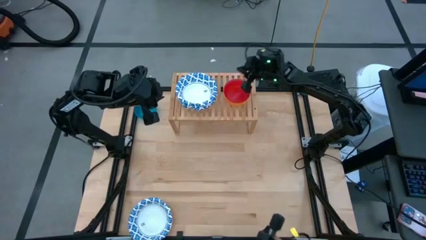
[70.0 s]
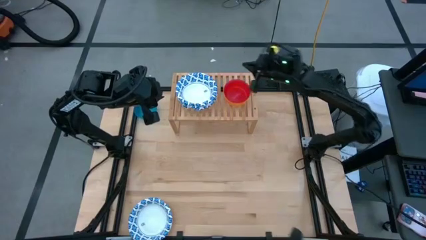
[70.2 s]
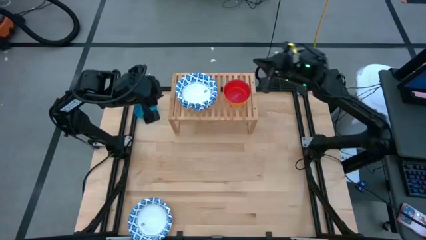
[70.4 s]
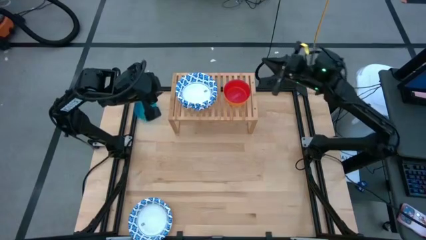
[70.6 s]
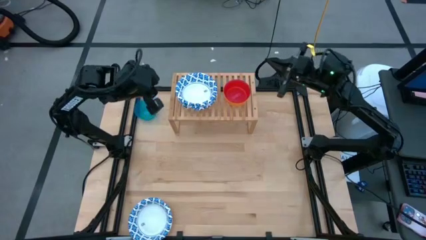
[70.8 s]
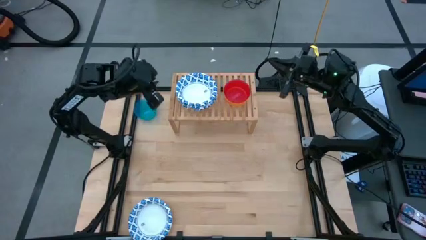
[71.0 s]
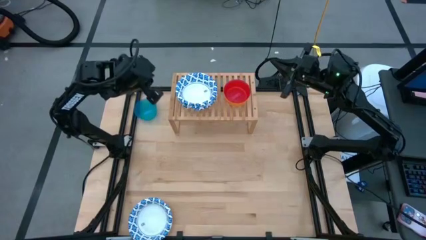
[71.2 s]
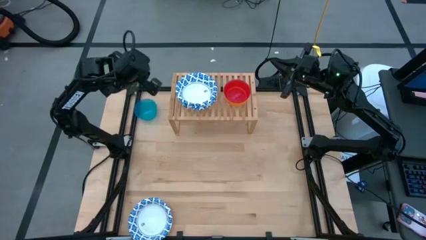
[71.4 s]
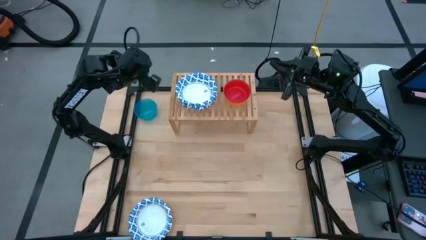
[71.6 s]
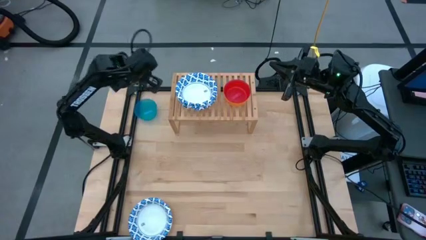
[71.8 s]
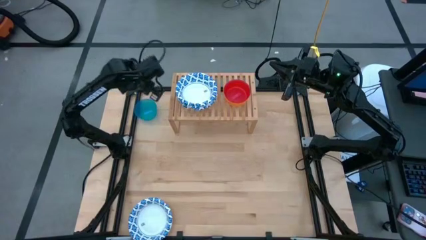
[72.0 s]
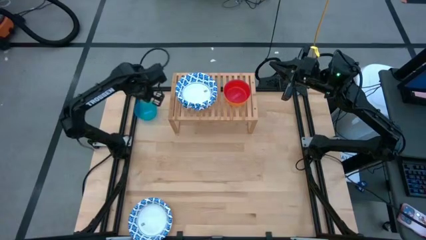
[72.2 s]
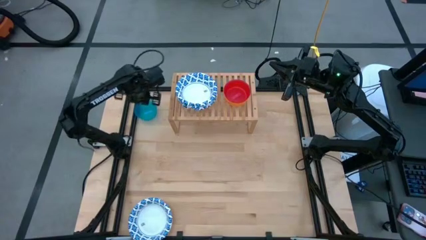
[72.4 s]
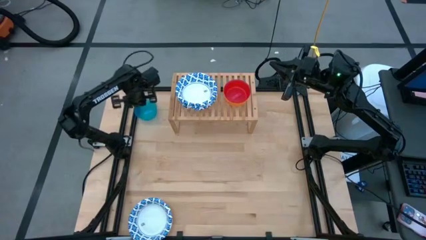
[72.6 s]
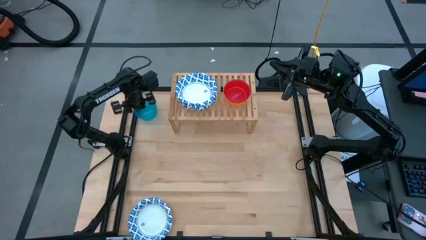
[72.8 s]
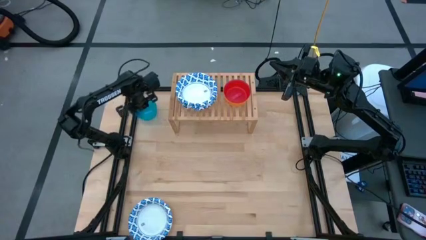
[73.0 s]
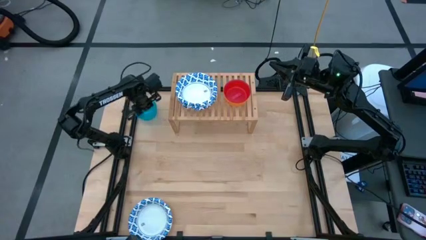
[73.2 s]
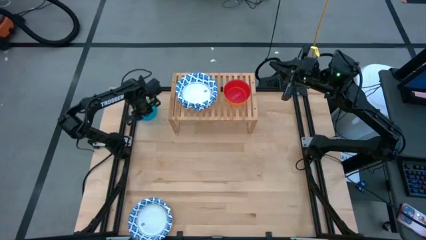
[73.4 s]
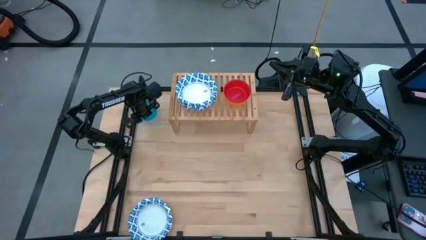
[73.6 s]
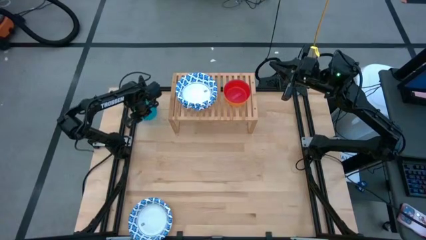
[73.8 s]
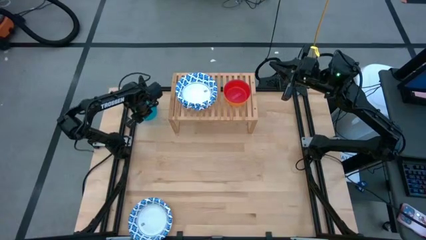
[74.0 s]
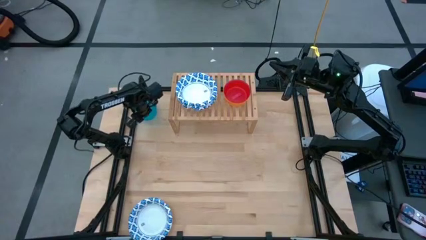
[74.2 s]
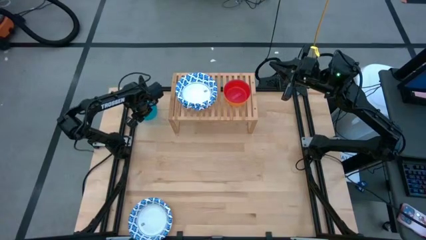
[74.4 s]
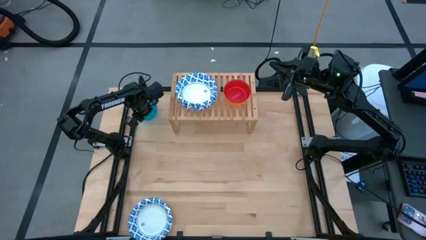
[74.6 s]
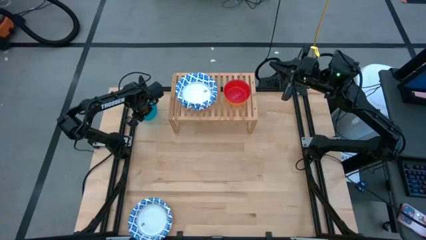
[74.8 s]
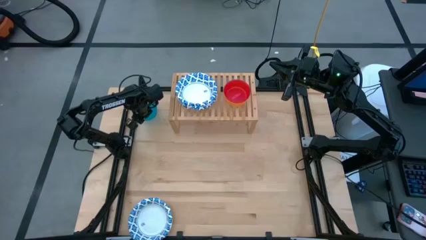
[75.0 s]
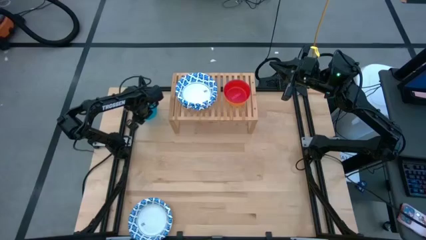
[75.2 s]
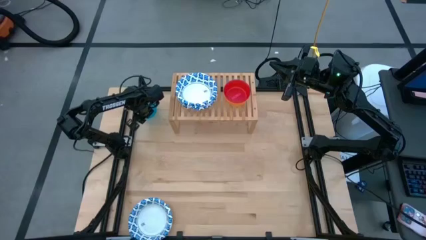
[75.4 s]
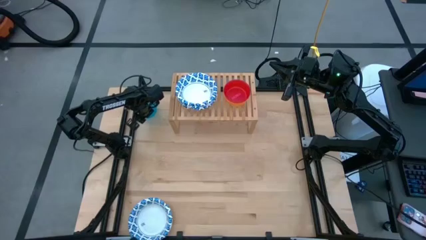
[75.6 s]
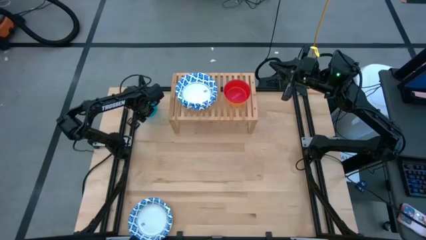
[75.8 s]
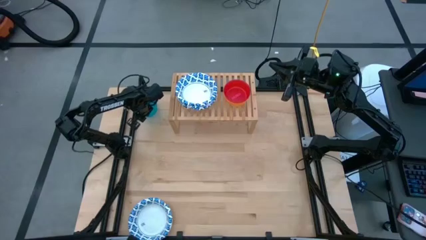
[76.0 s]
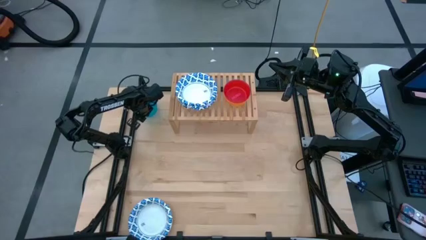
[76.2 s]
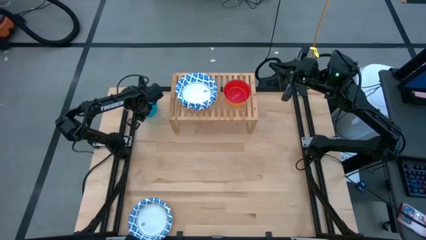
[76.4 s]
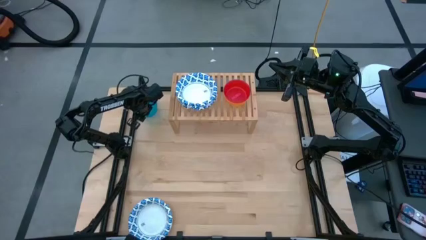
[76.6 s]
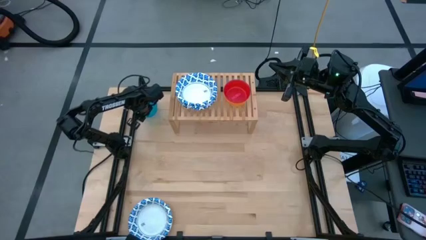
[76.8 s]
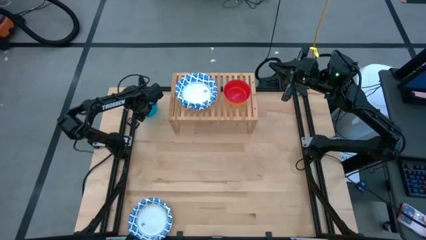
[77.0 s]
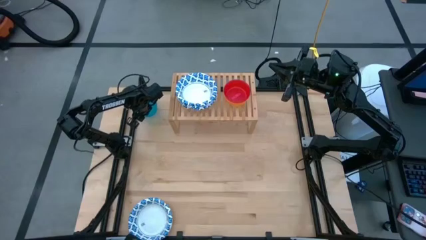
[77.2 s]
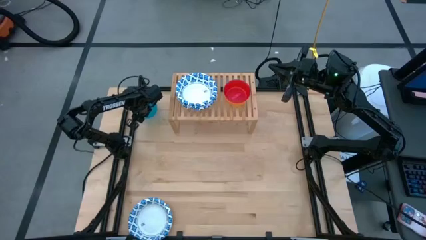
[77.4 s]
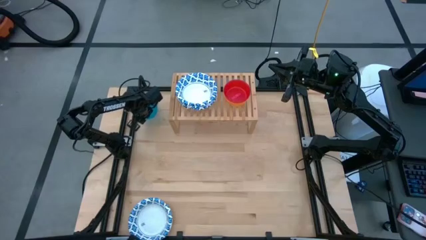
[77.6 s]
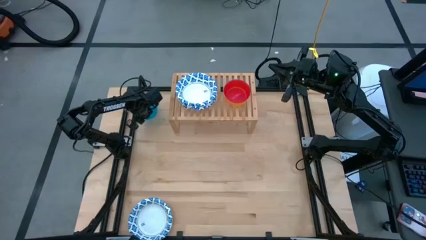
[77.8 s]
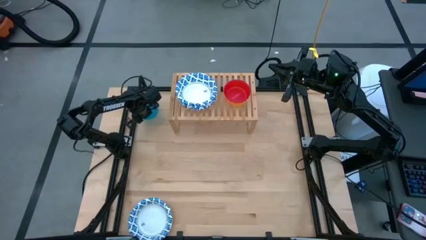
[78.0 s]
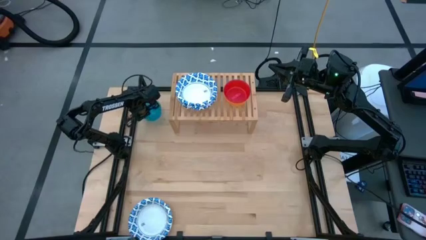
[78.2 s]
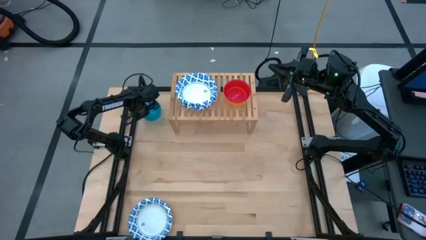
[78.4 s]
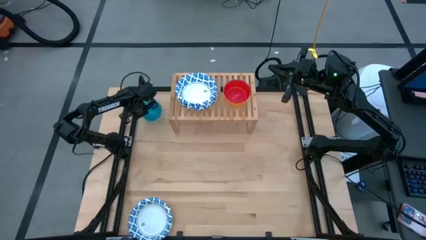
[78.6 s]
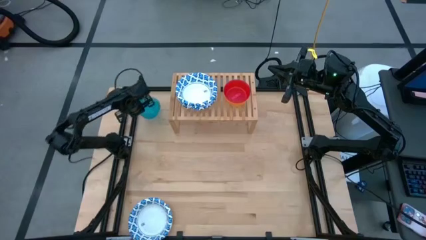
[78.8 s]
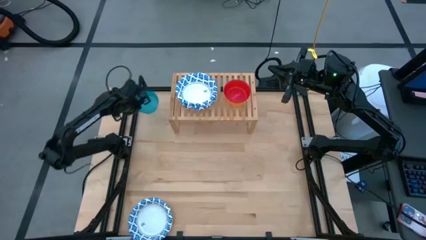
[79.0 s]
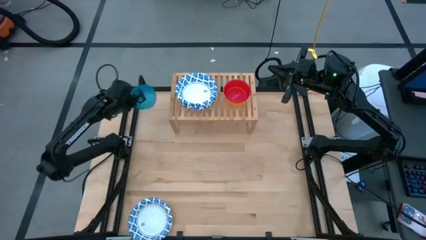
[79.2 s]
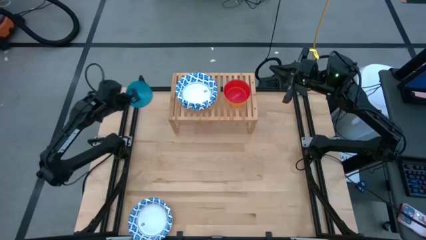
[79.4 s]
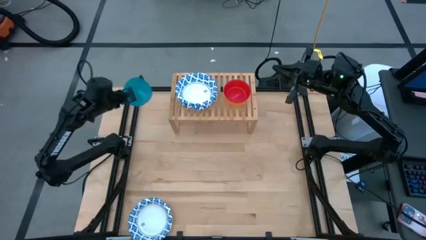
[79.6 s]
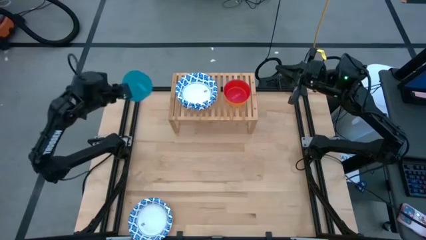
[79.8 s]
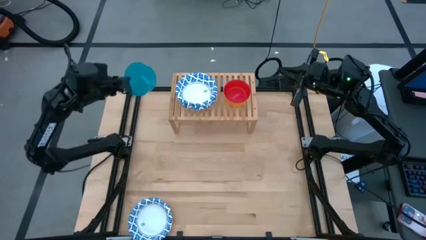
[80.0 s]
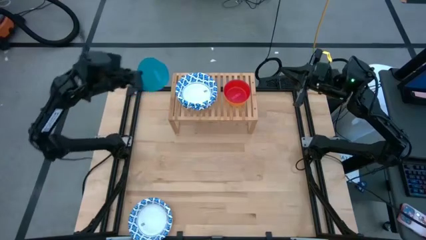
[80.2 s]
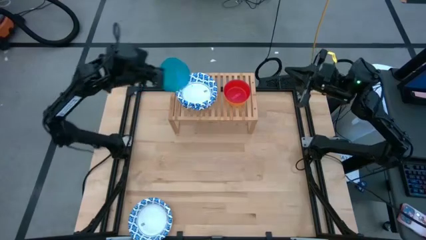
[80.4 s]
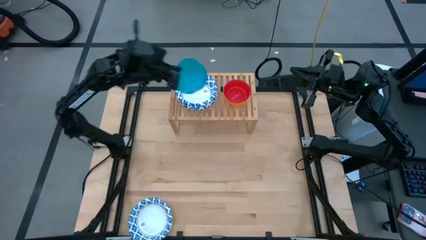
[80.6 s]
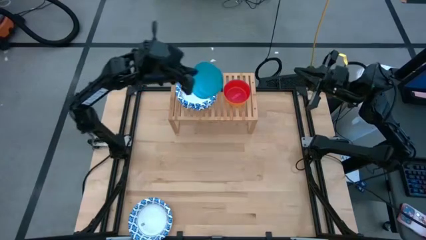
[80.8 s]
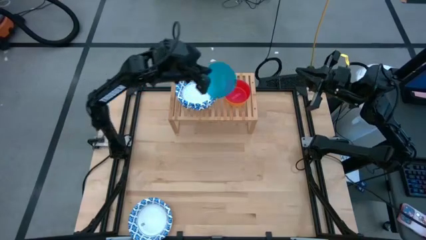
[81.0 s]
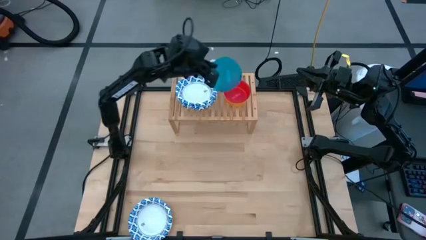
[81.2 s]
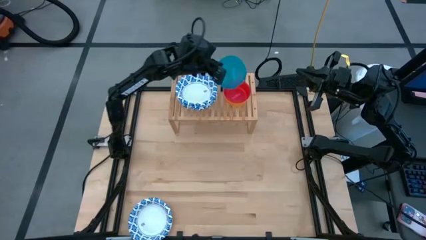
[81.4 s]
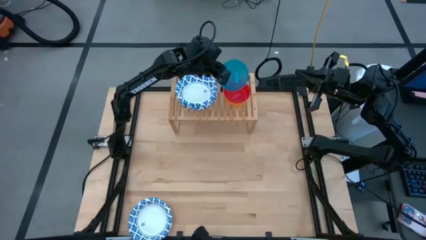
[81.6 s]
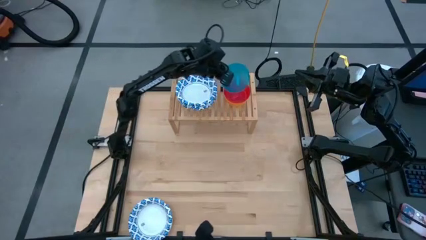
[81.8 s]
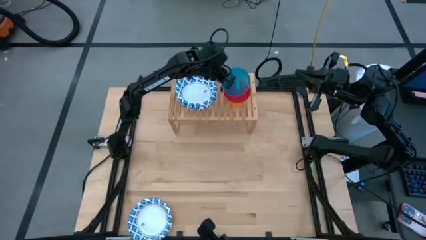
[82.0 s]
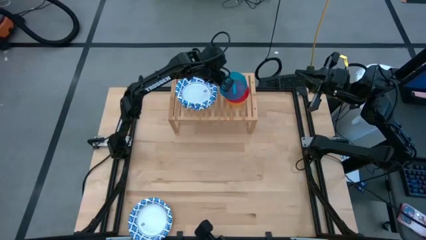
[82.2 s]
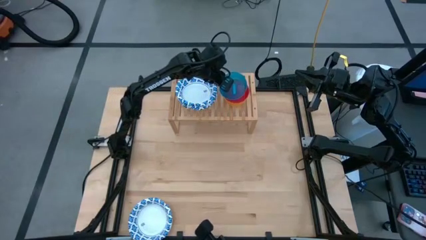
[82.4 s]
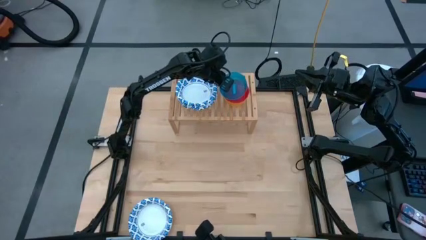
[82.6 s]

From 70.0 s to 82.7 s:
Task: Place and stack bowls onto a shelf
Stack the blue bowl on top of the red bowl on the shelf

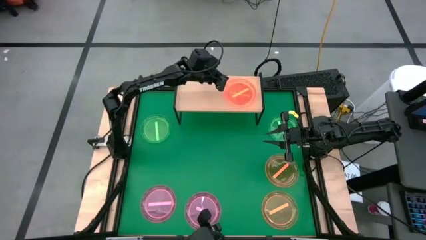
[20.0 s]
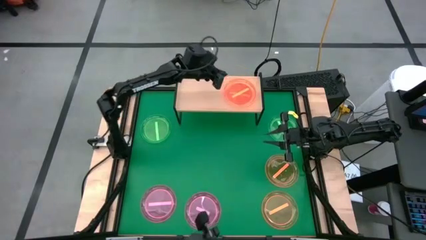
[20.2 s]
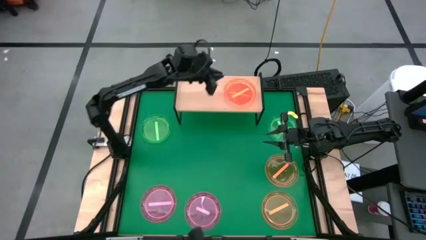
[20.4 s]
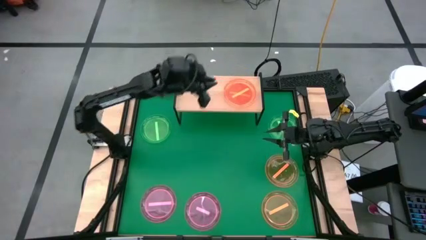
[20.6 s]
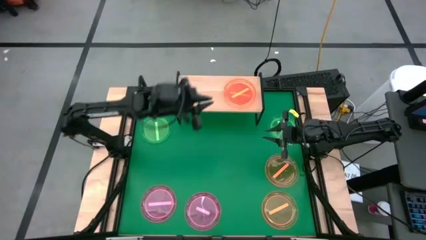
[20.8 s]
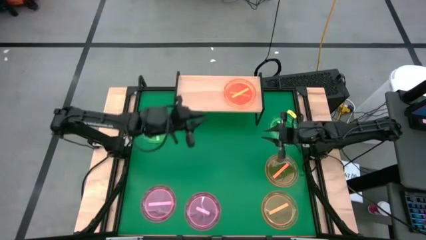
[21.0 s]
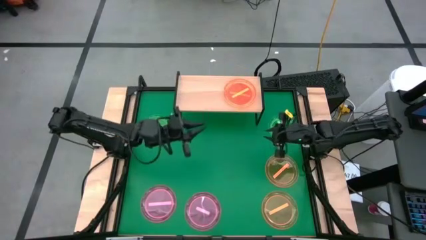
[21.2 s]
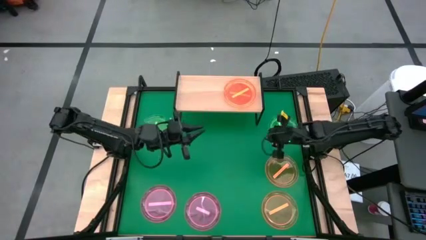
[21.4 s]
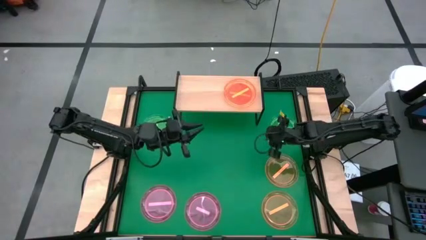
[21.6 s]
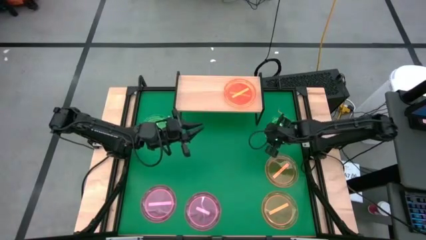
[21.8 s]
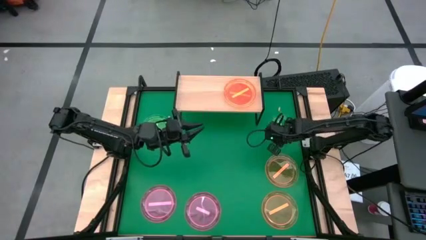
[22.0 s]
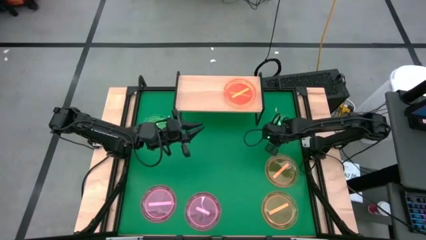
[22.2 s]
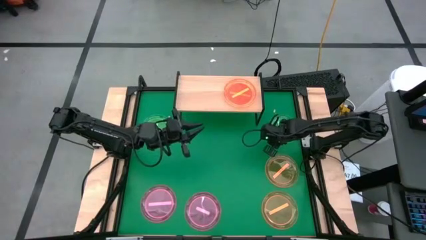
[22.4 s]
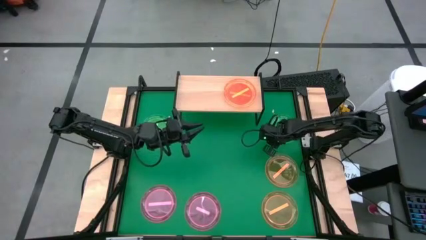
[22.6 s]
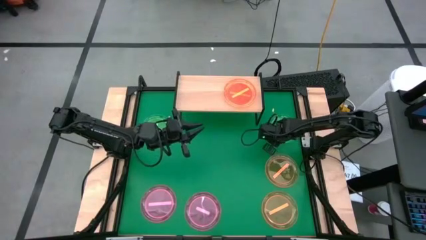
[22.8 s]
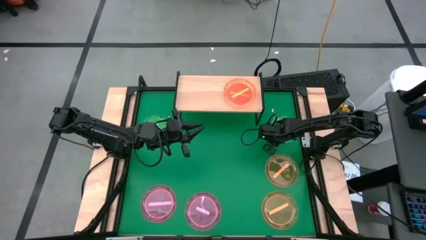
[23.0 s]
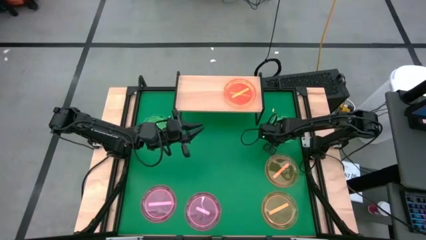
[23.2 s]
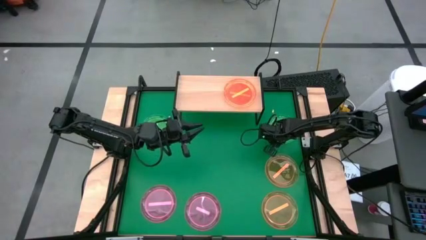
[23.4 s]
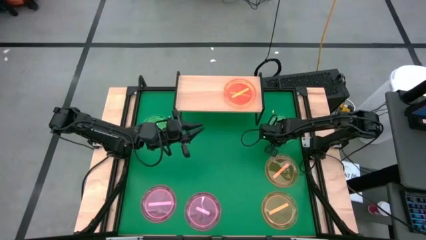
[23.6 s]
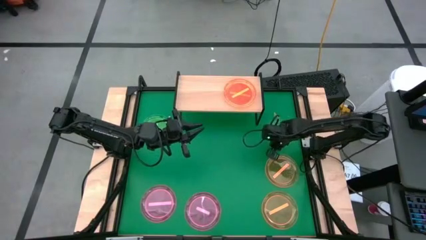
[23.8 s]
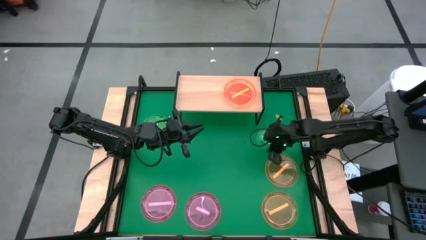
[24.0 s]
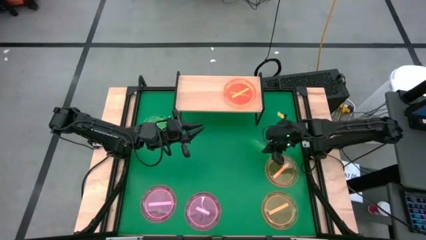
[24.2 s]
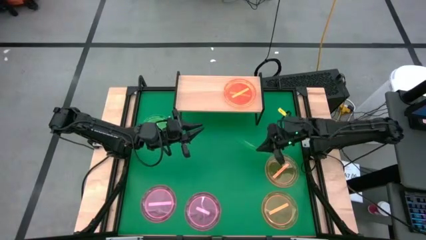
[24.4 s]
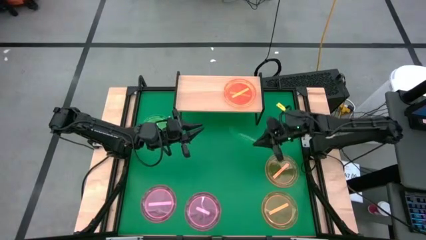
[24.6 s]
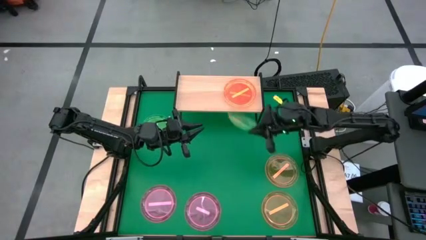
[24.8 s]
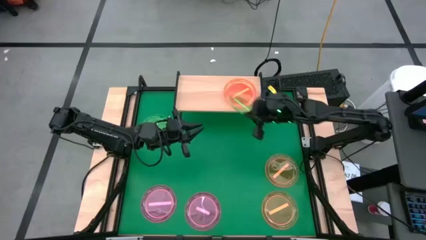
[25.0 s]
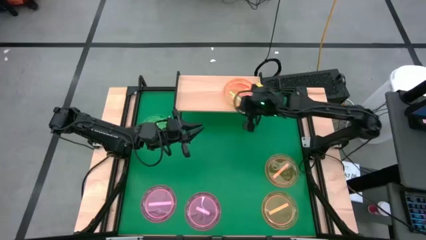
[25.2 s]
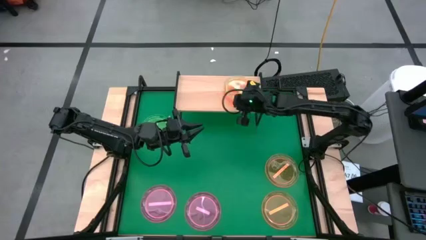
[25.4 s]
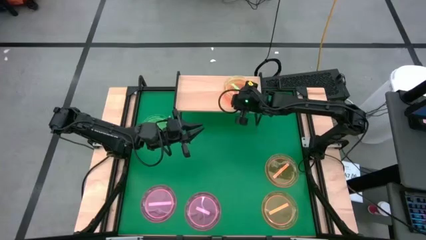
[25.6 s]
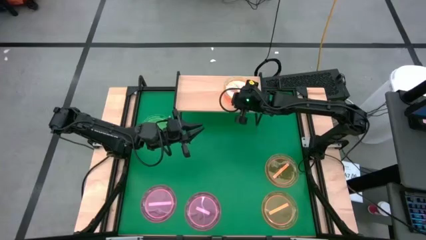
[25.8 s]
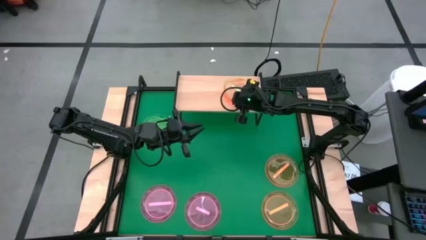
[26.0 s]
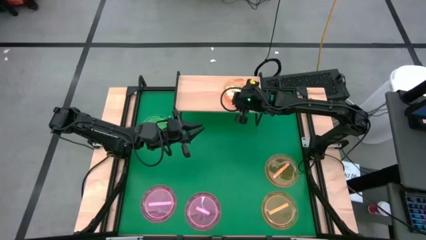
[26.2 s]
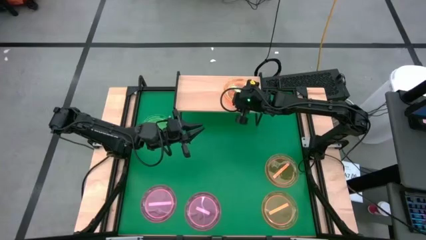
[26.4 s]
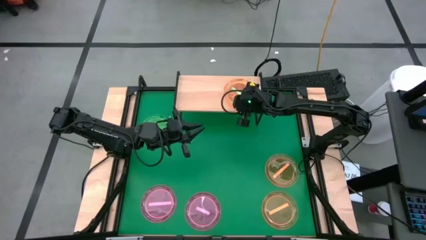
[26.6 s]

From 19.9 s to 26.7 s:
Task: Place and stack plates onto a shelf
Stack the green plate on top of the orange plates on the shelf
